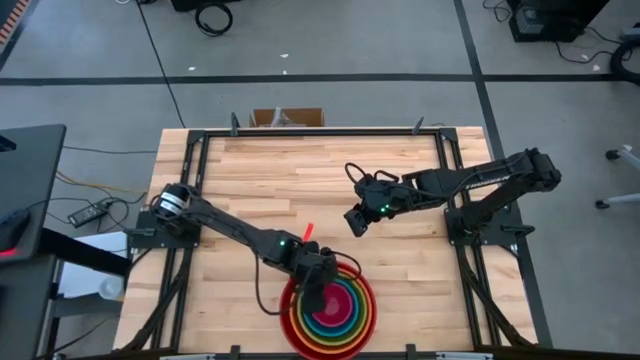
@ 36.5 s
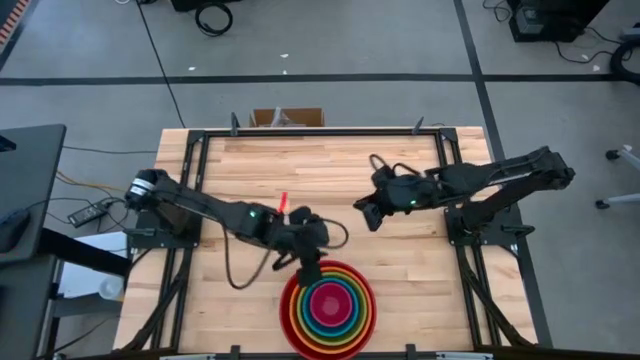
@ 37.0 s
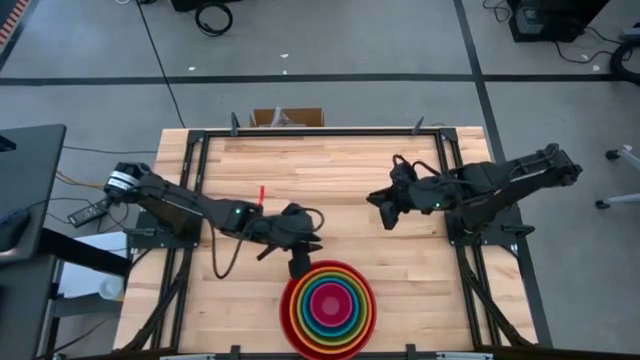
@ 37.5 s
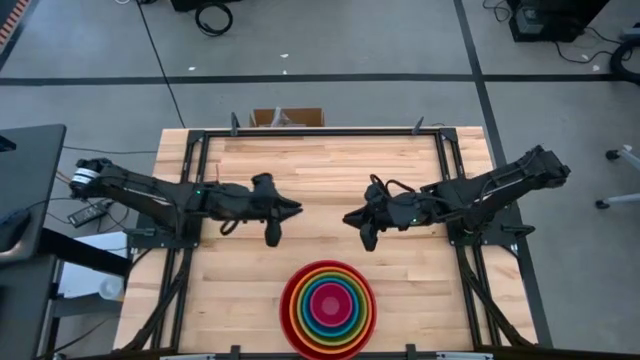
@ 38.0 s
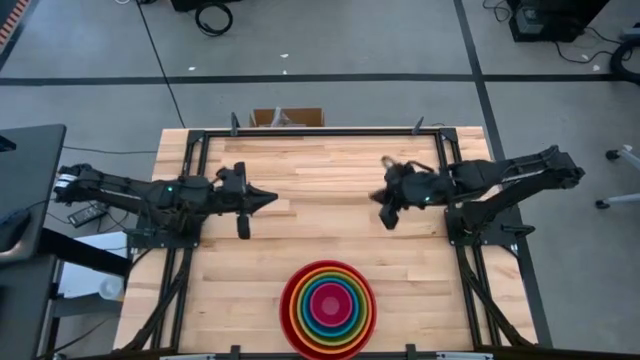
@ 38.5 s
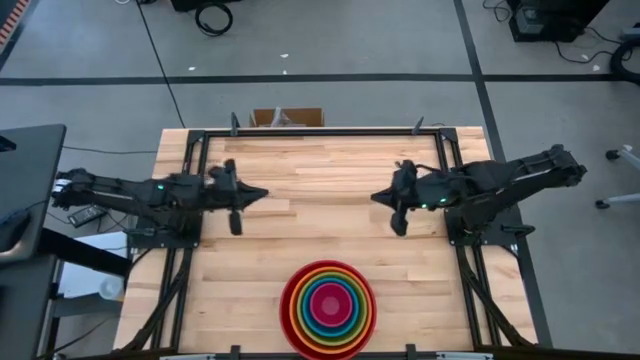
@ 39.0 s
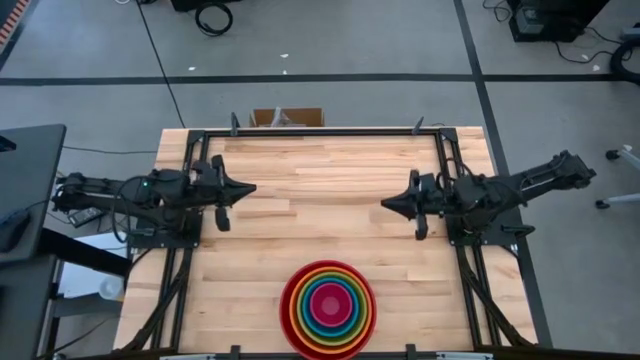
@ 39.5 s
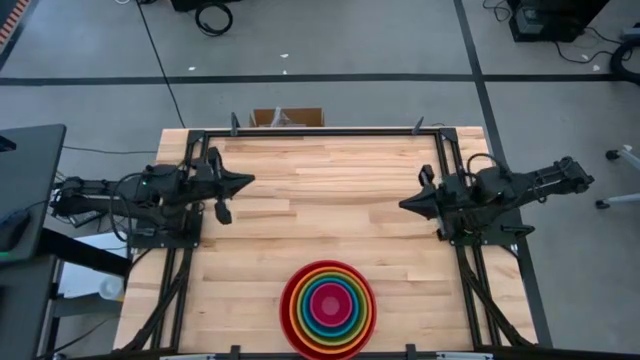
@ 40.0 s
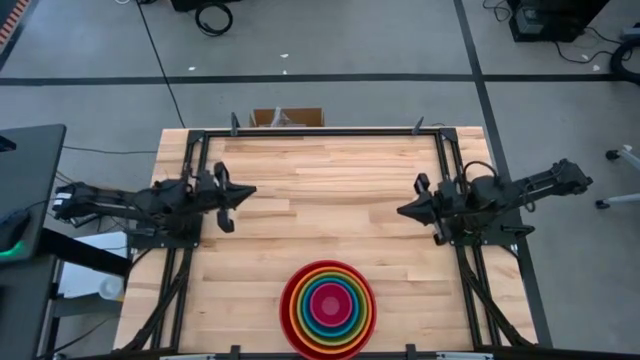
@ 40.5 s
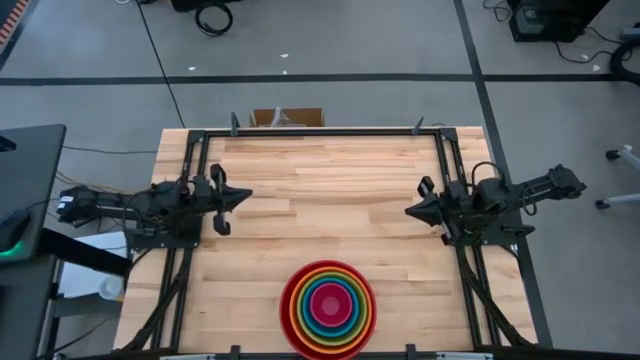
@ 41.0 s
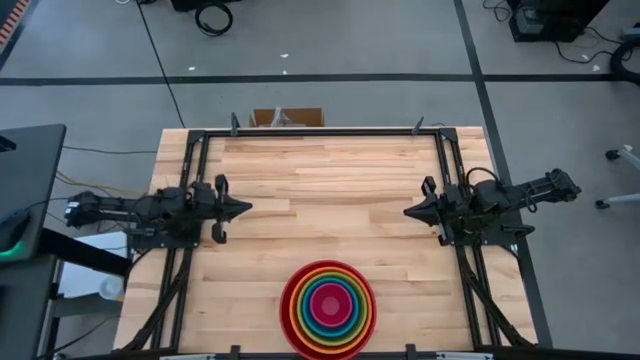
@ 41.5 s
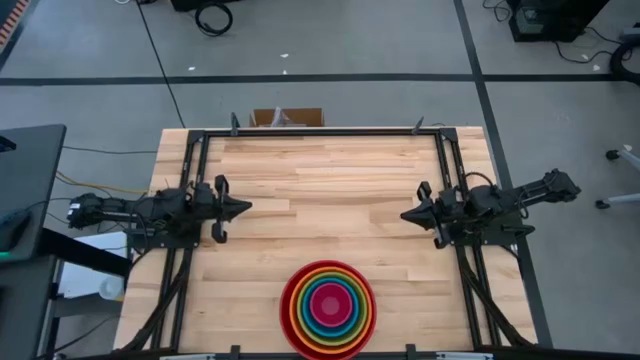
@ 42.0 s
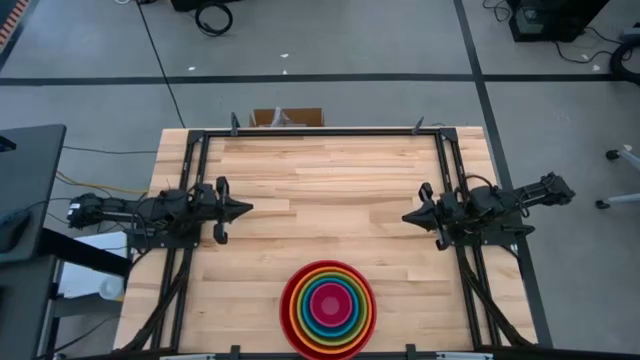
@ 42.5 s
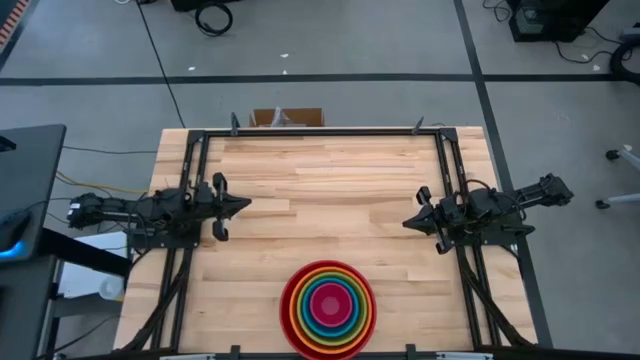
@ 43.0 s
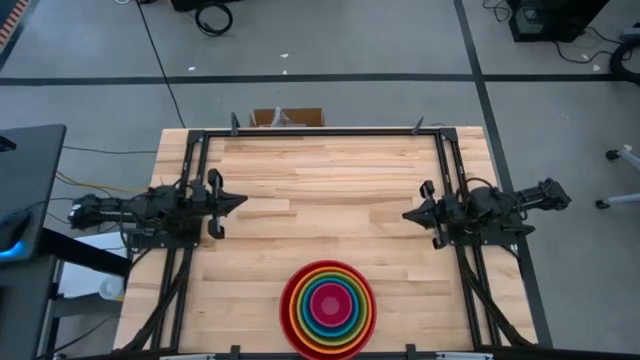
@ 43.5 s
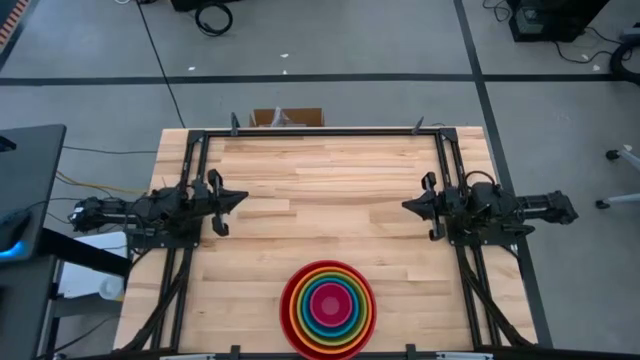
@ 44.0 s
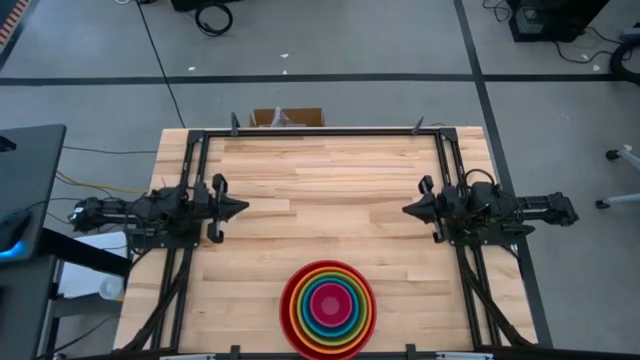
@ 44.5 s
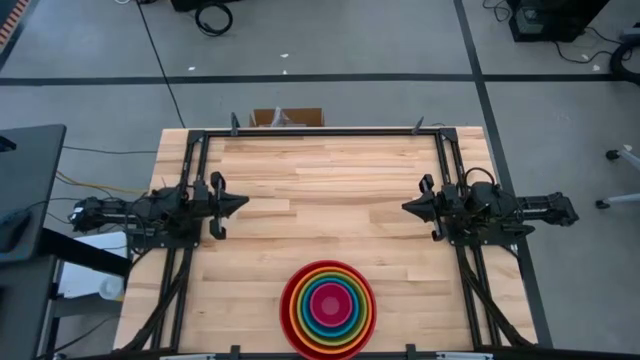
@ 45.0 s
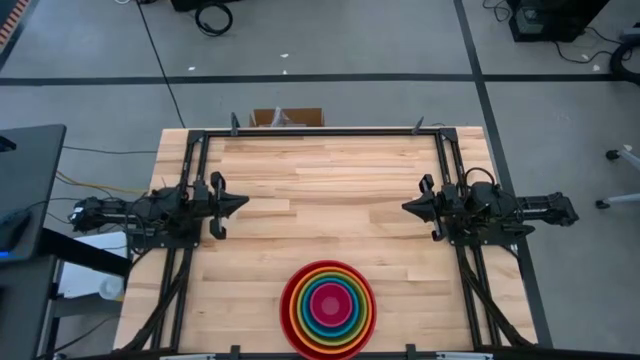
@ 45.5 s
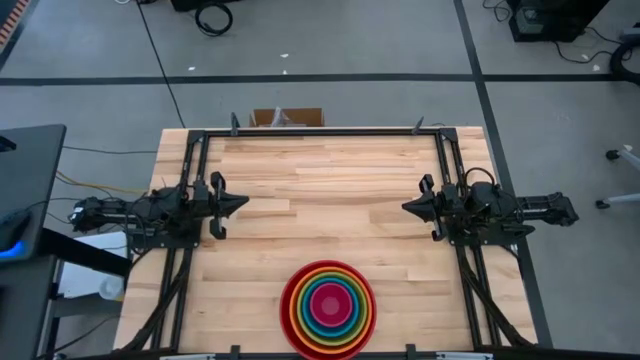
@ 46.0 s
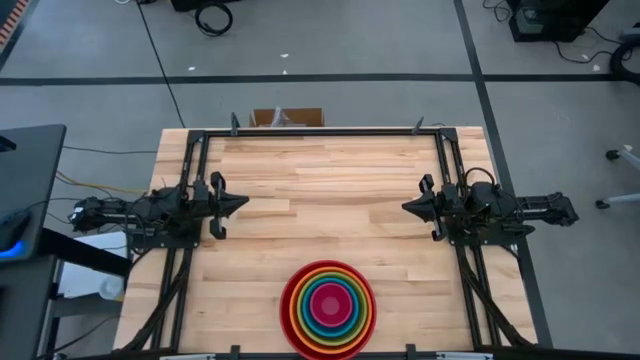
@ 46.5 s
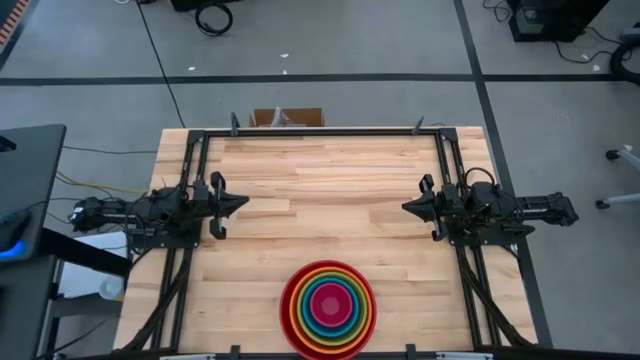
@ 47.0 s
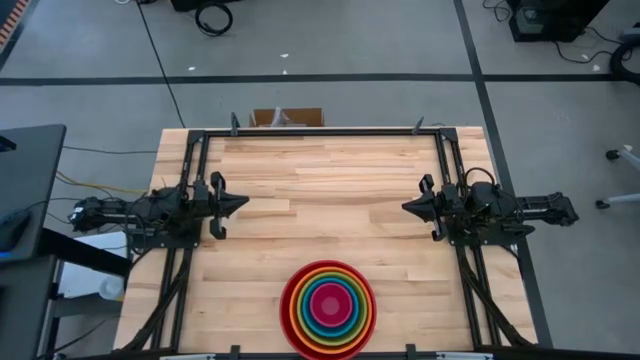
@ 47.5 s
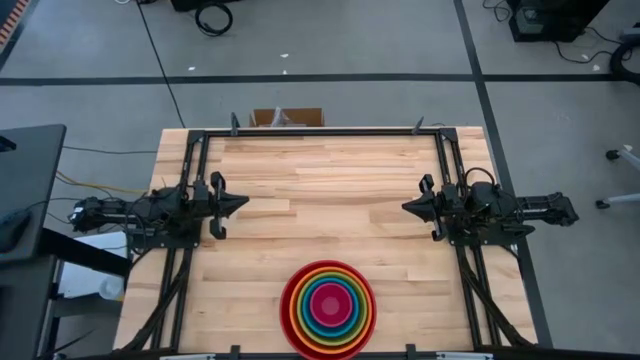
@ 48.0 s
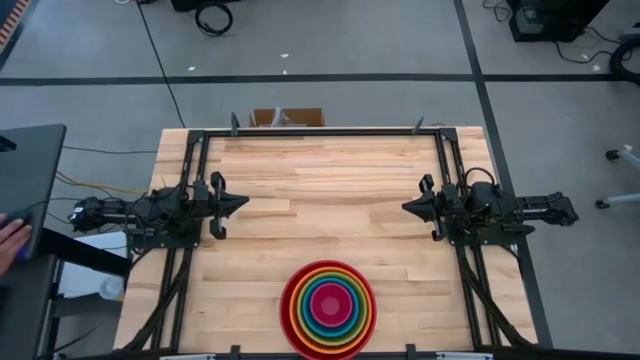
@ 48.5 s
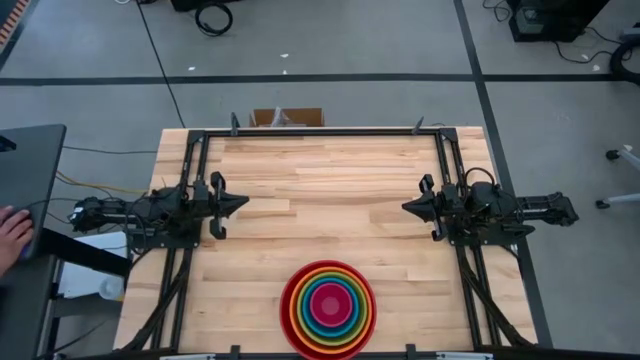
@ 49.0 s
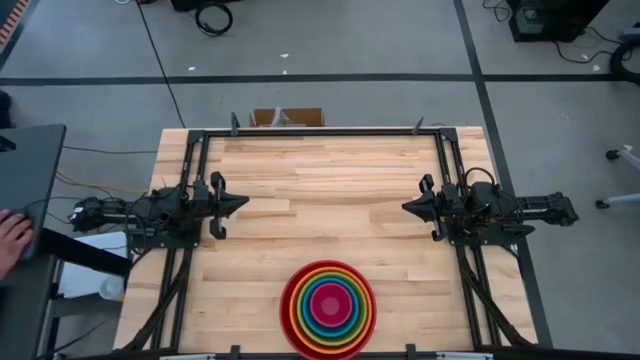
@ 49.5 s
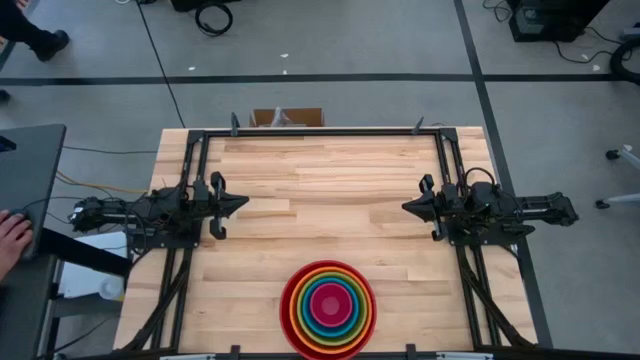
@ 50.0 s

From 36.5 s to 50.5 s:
Return to Home Position
